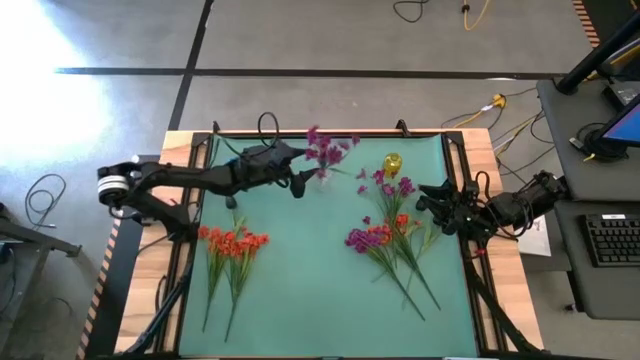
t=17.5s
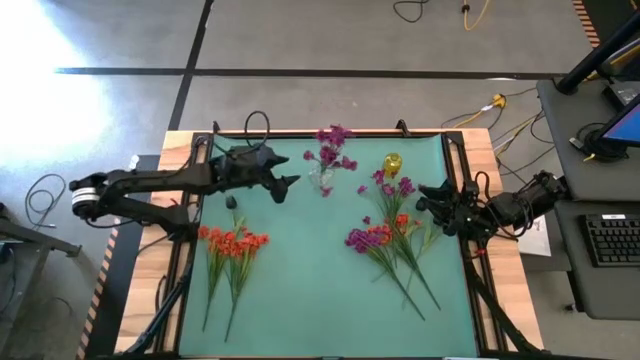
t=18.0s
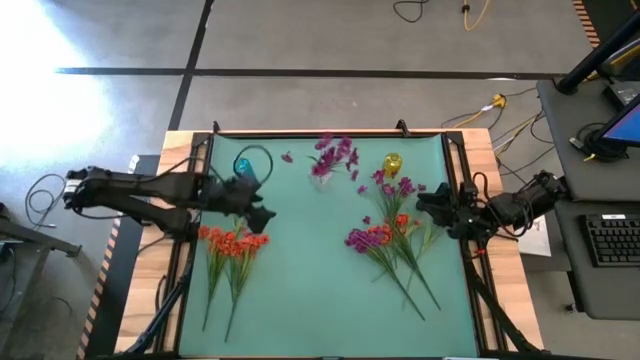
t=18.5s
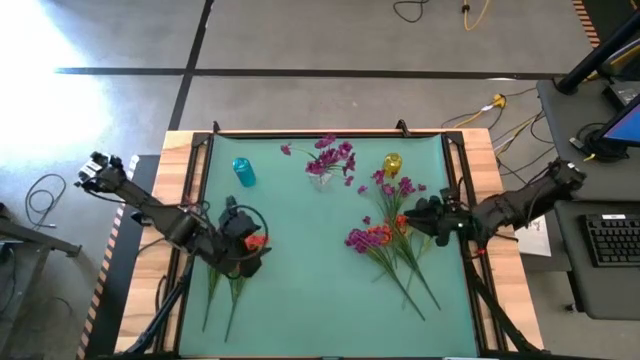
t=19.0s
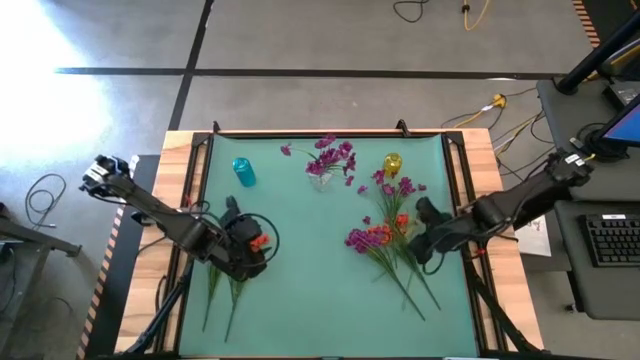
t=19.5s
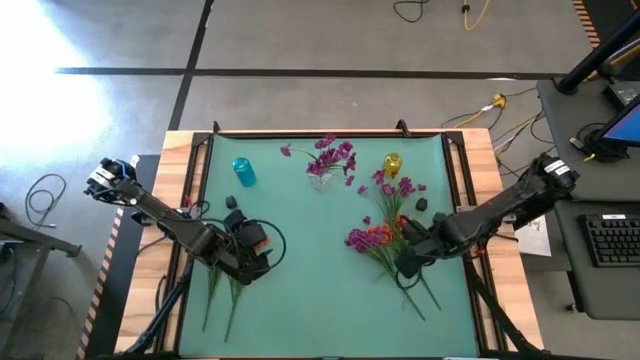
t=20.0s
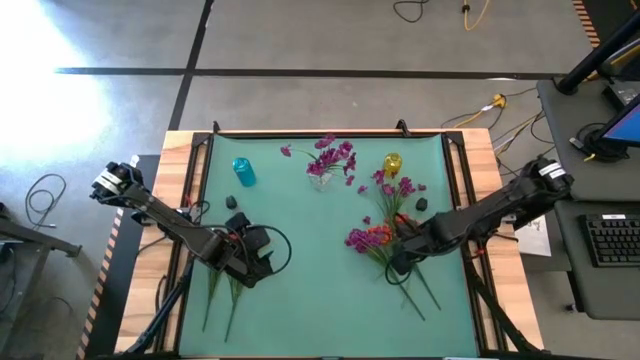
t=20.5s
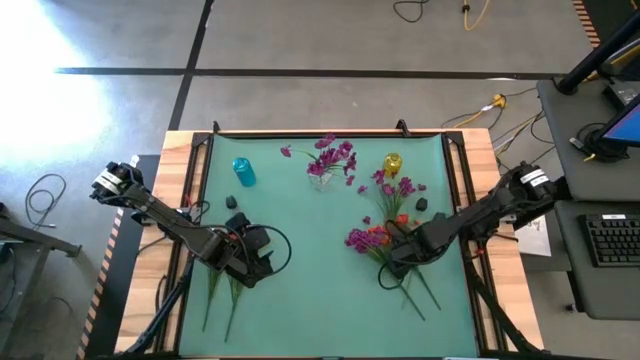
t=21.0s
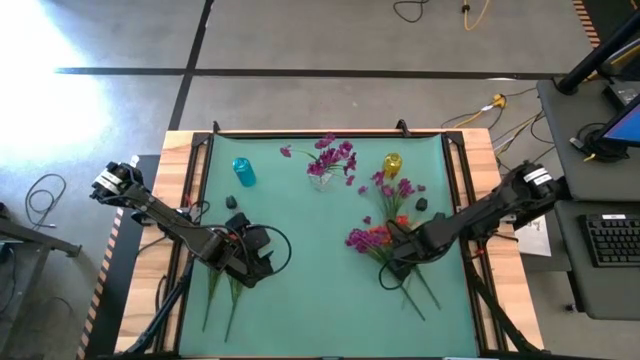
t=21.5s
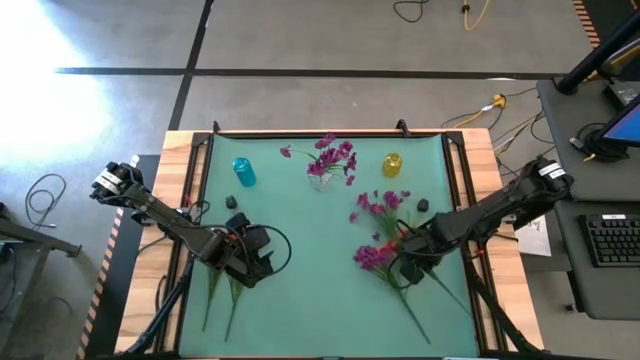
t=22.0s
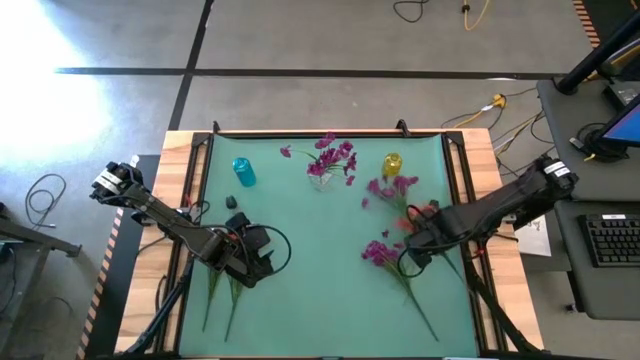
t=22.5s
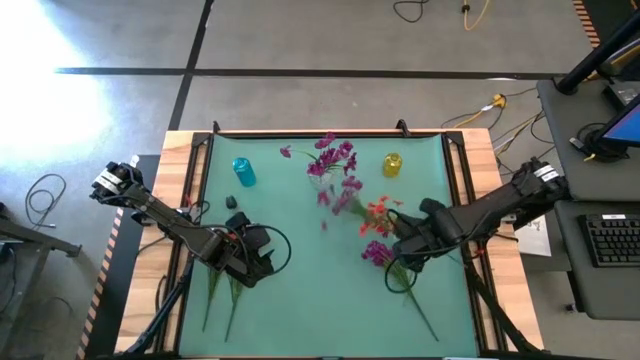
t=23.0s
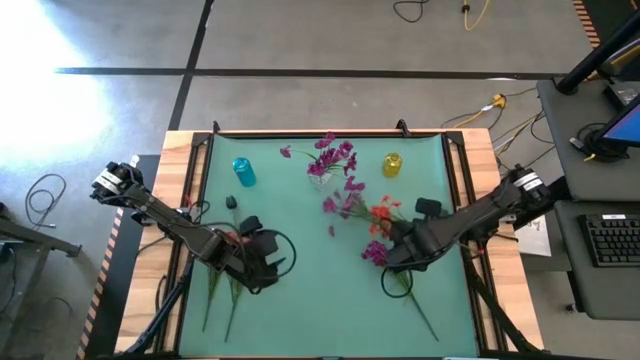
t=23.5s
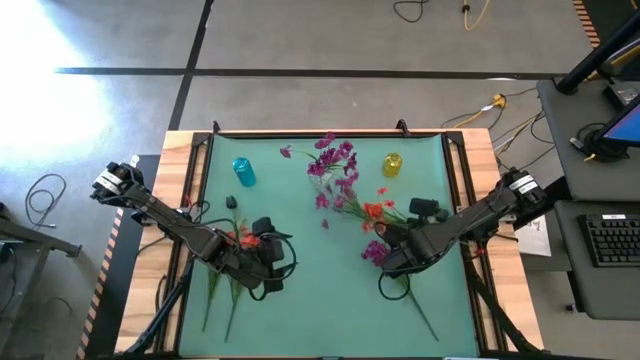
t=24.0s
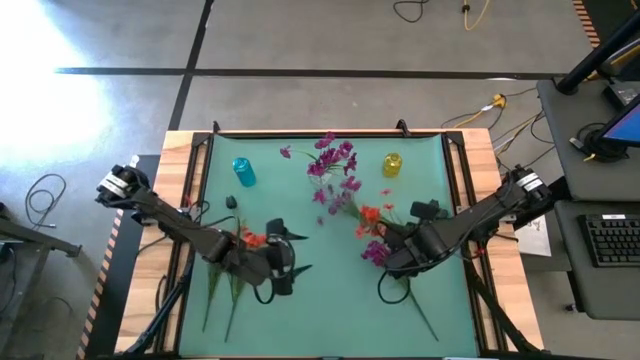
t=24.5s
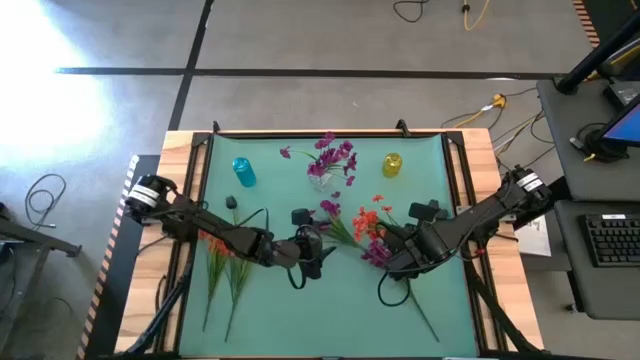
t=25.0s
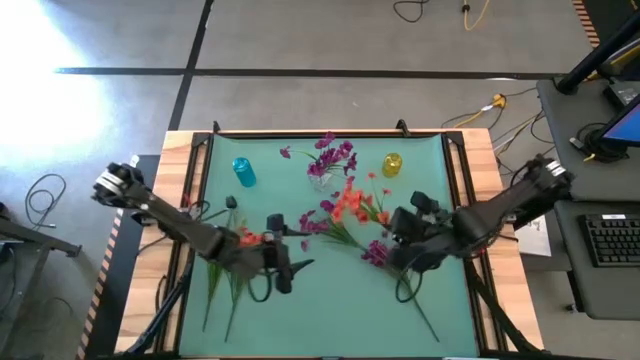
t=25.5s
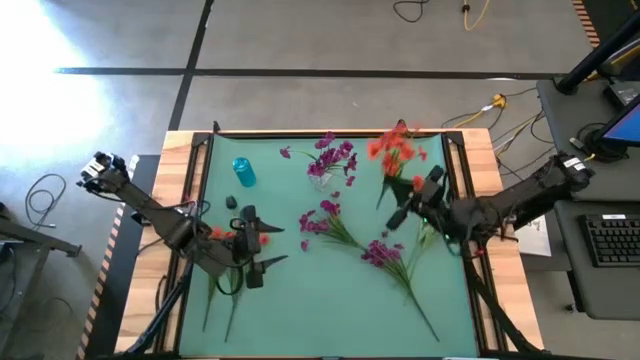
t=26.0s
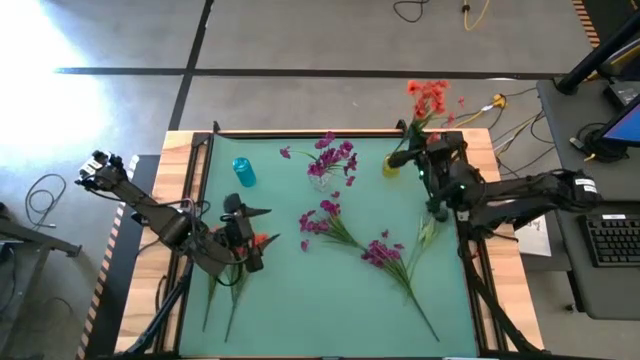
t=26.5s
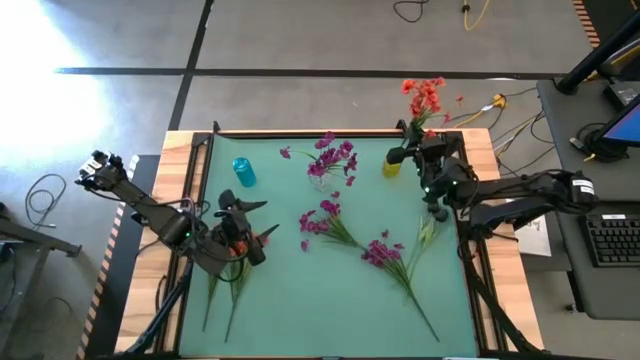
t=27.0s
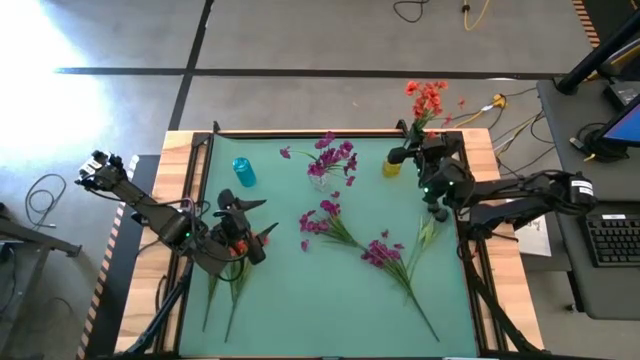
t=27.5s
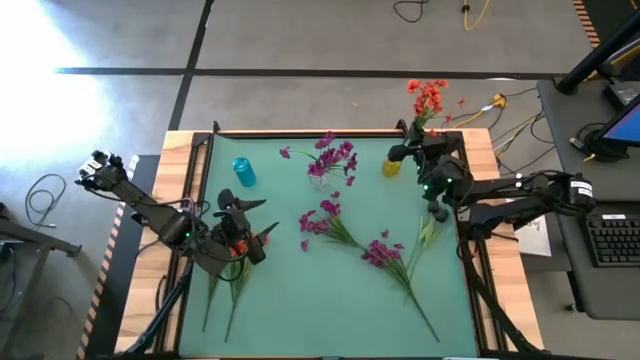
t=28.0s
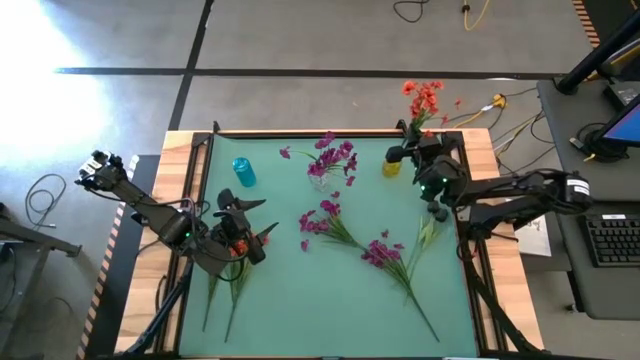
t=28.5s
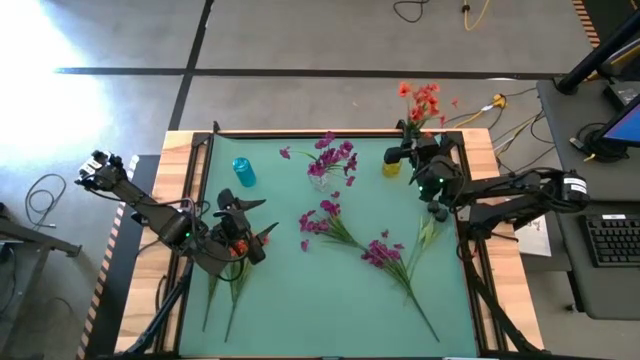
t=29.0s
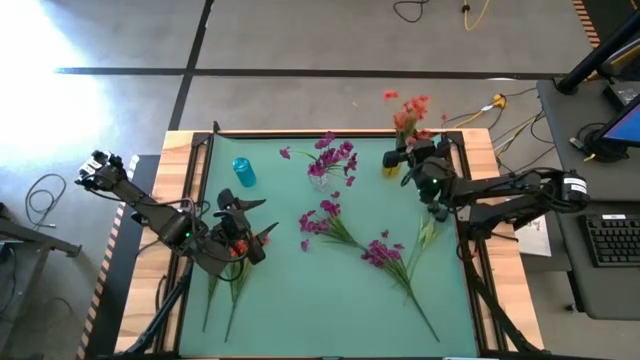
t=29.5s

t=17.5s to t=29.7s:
Task: Sort flowers into vase by color
Put the right orange flowers into the yellow flower vase

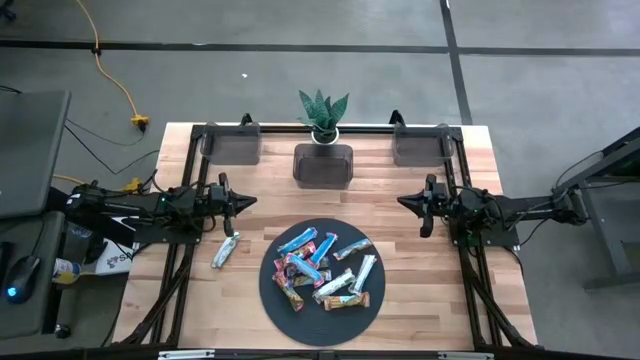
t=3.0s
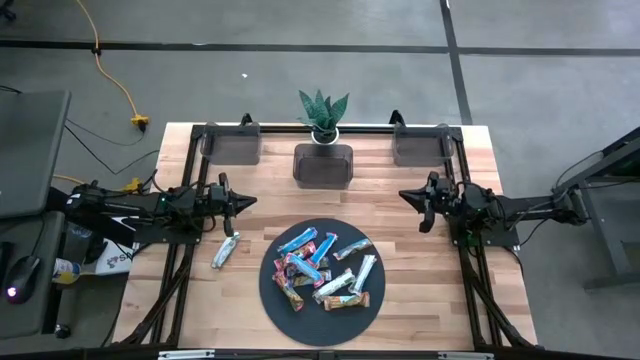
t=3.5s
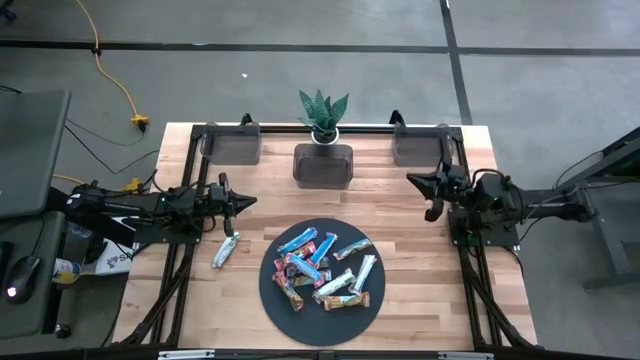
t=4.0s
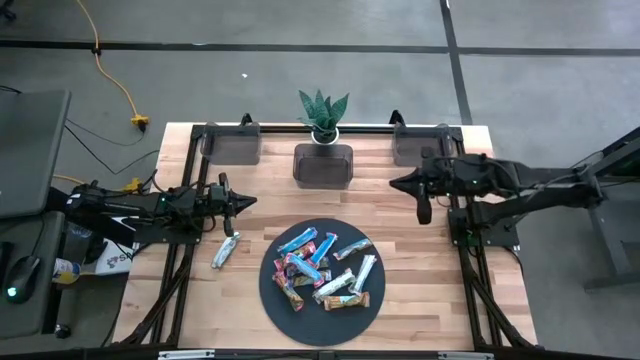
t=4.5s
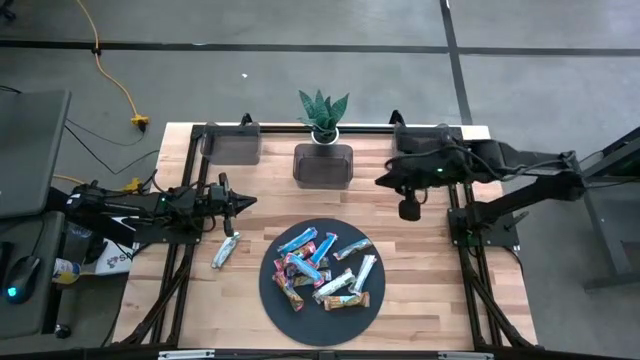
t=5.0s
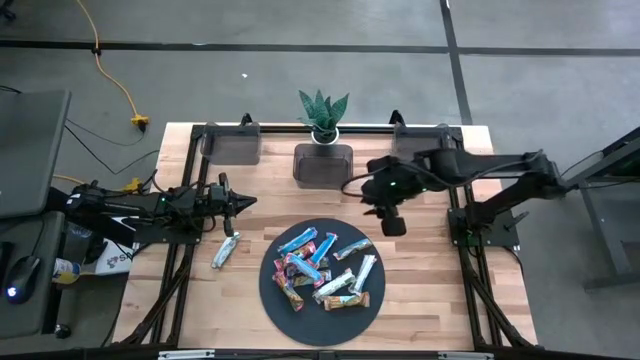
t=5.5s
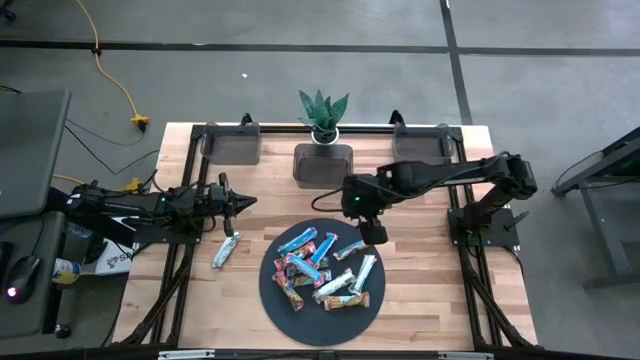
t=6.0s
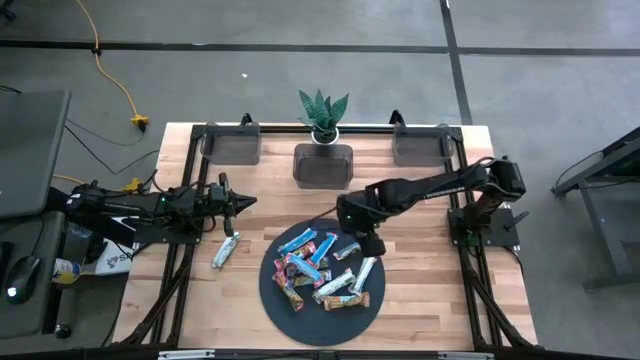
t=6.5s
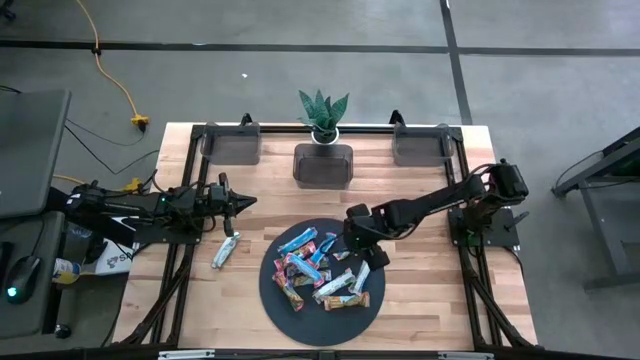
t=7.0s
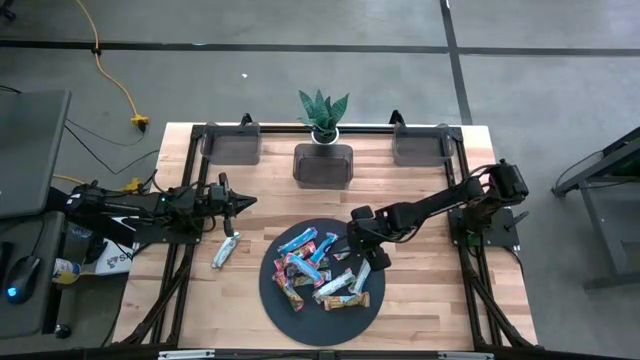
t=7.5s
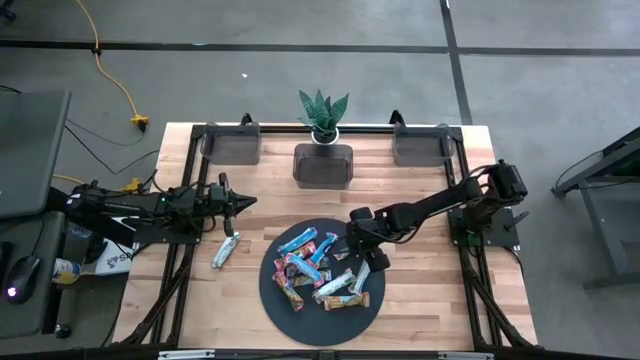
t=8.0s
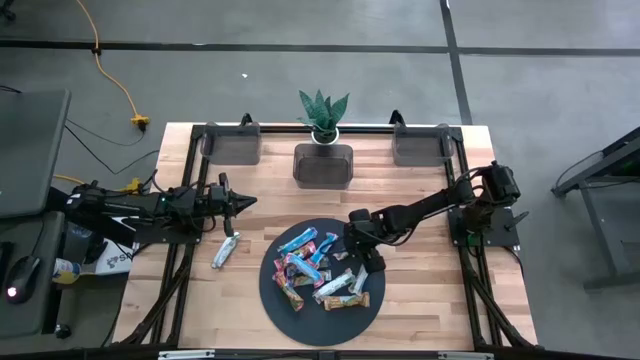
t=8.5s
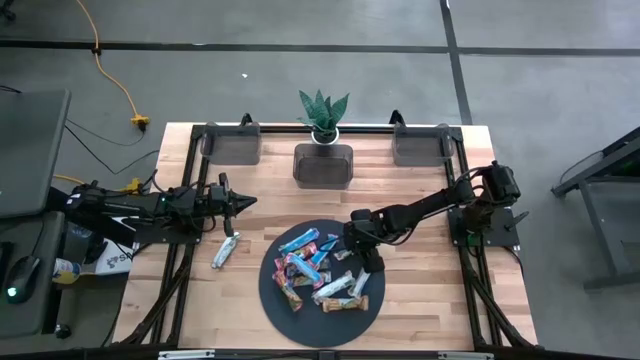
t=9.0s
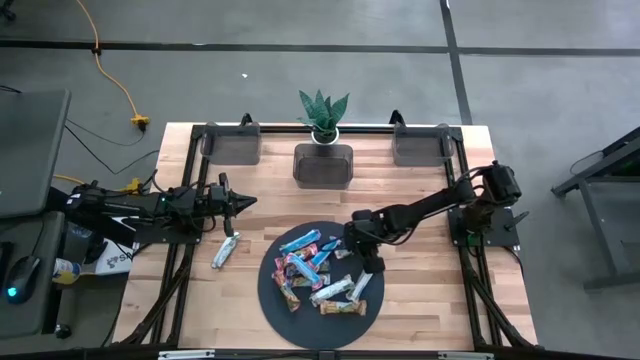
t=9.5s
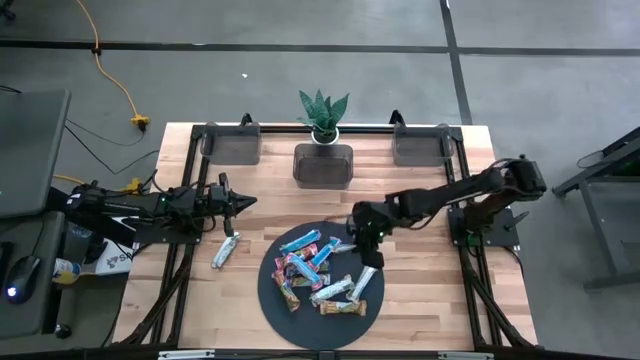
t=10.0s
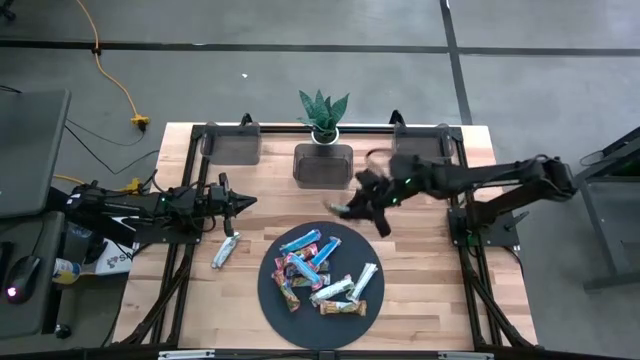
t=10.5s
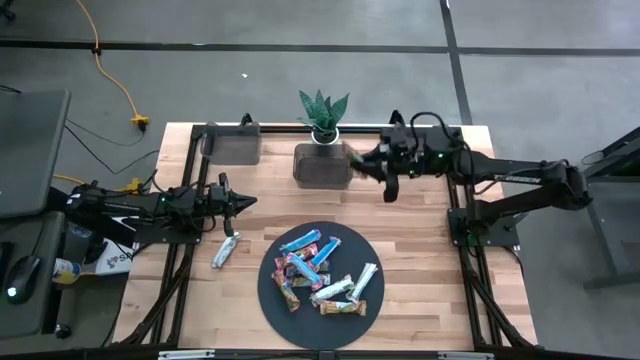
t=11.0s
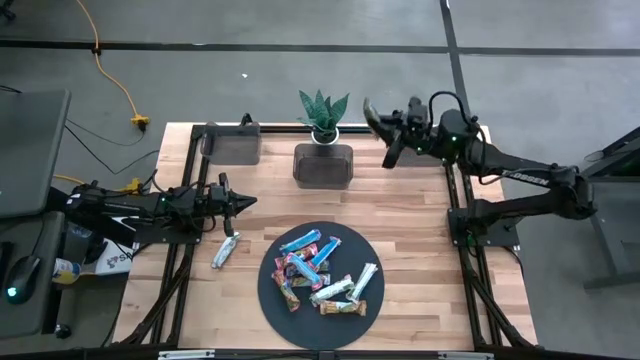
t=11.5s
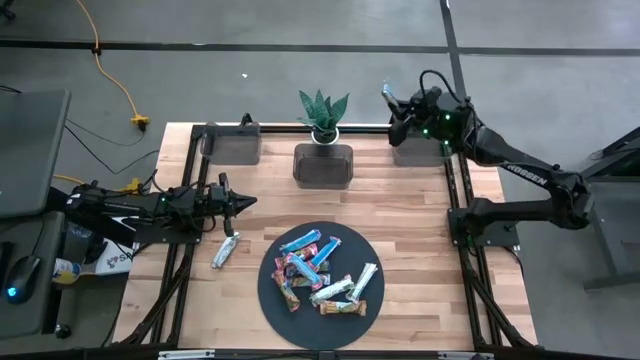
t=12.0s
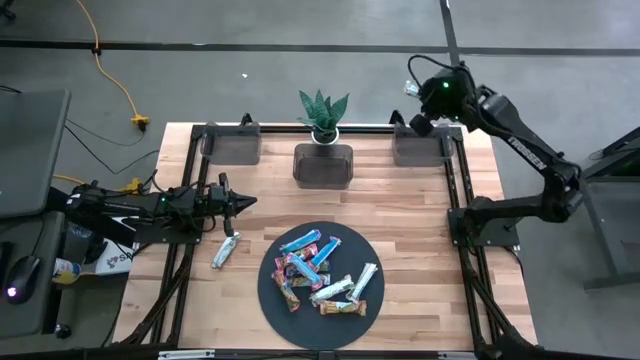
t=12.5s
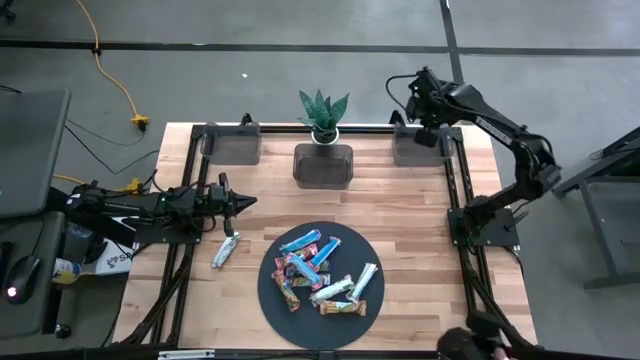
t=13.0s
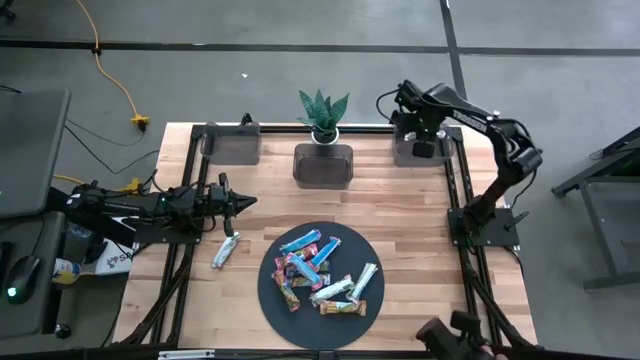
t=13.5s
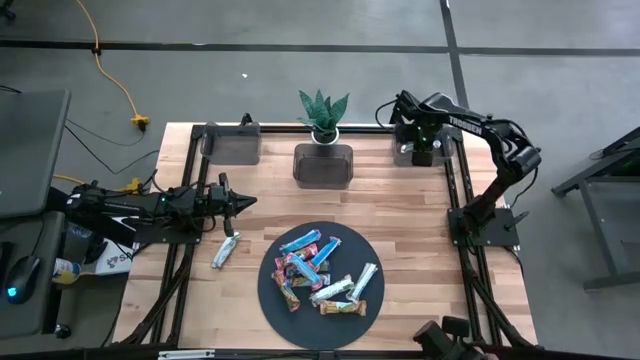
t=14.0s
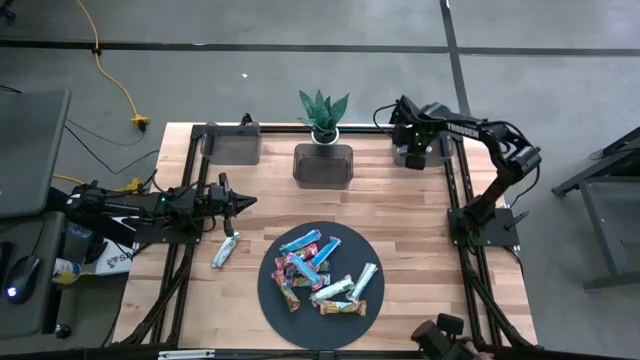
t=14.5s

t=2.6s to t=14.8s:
Task: Pick and place Granola Bars by type
Put the yellow granola bar into the right black bin
